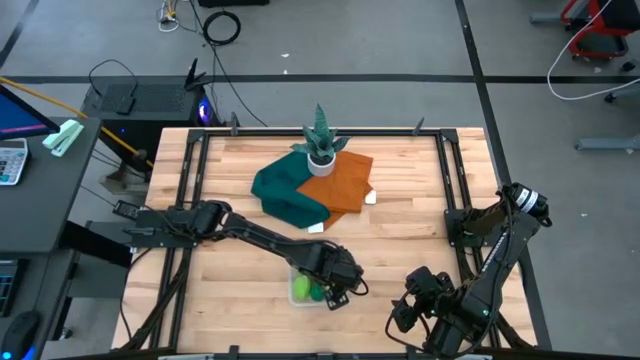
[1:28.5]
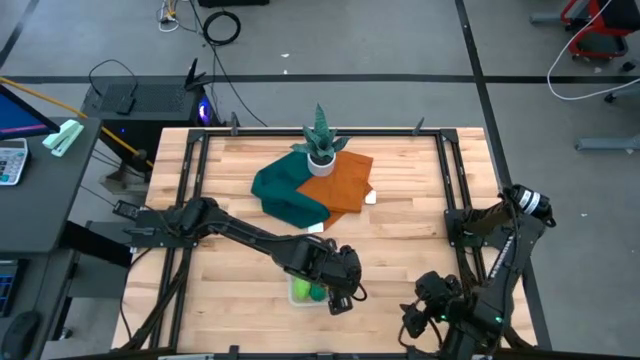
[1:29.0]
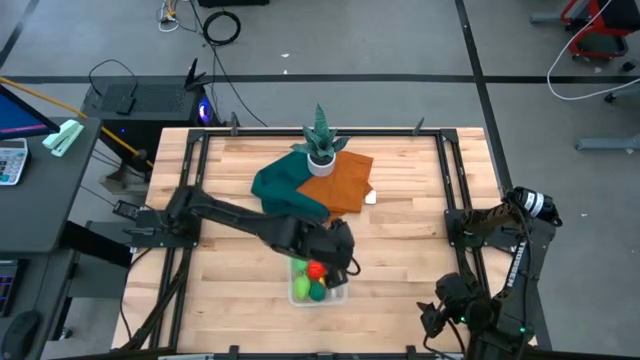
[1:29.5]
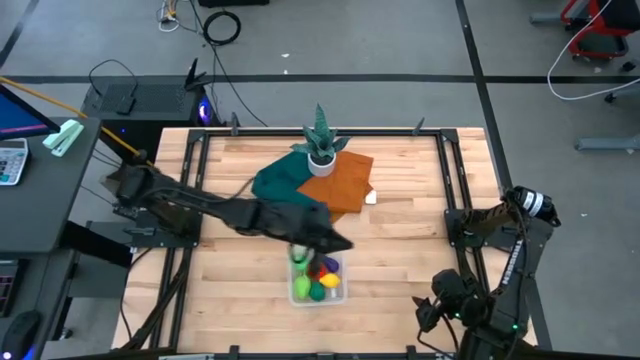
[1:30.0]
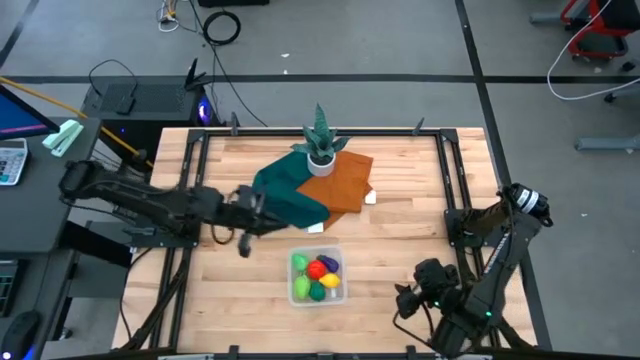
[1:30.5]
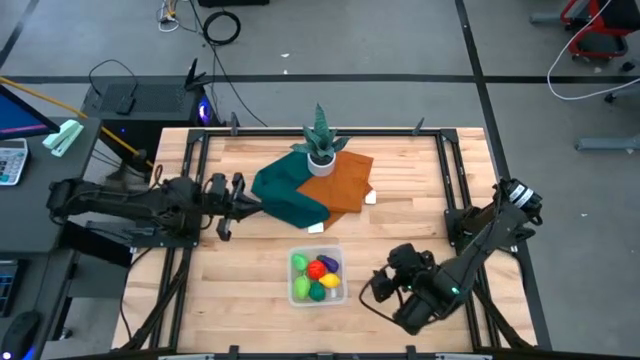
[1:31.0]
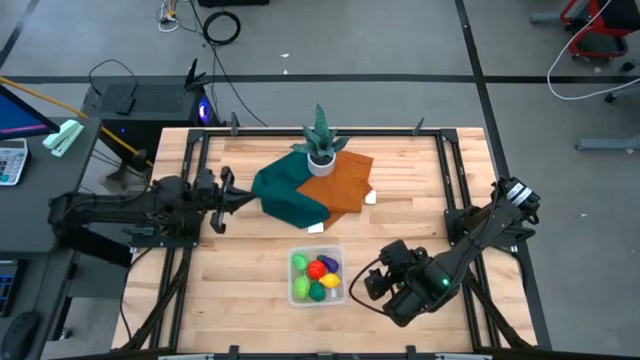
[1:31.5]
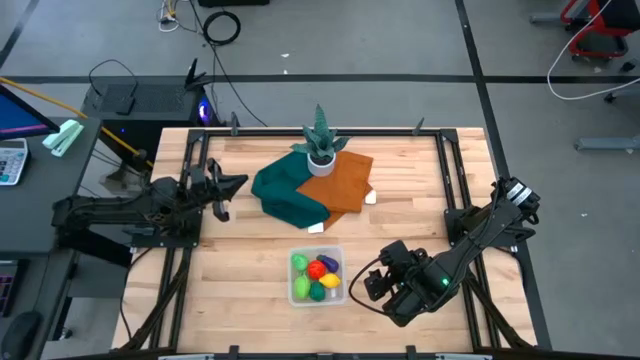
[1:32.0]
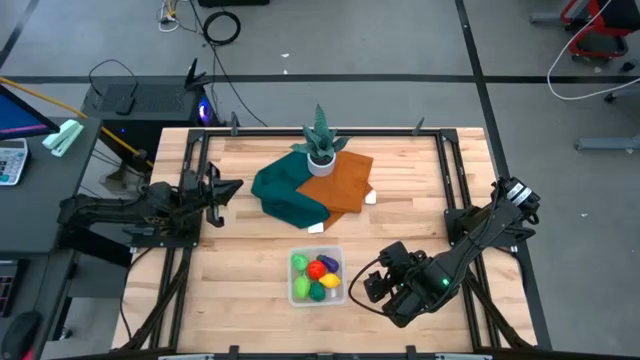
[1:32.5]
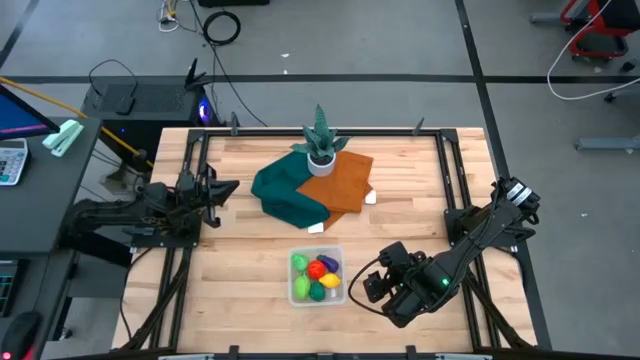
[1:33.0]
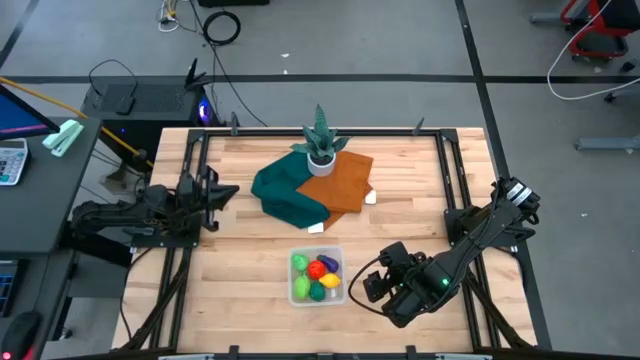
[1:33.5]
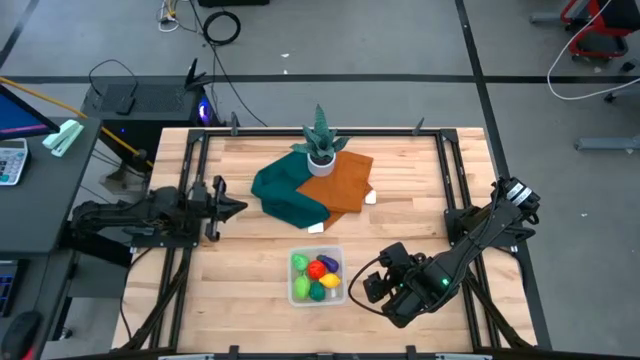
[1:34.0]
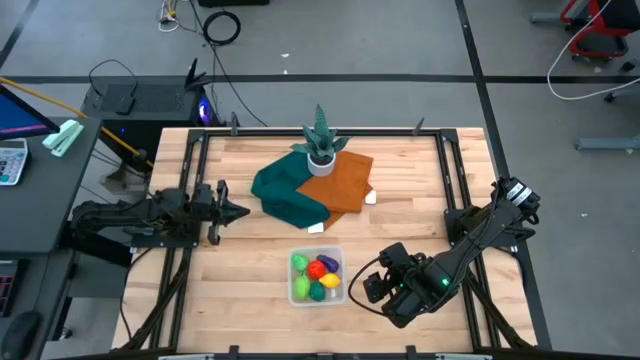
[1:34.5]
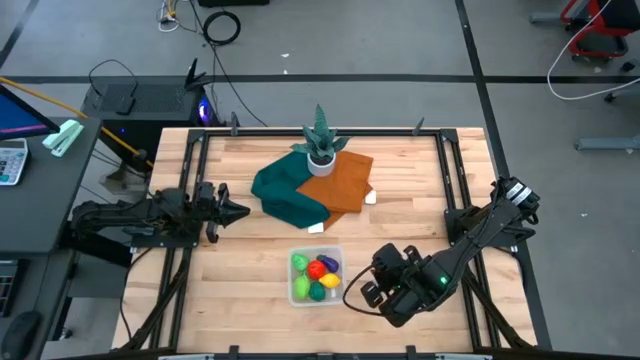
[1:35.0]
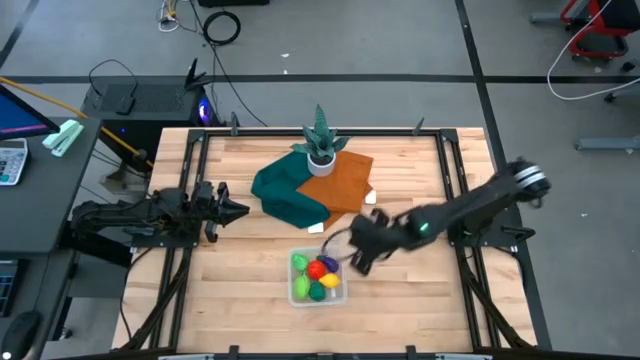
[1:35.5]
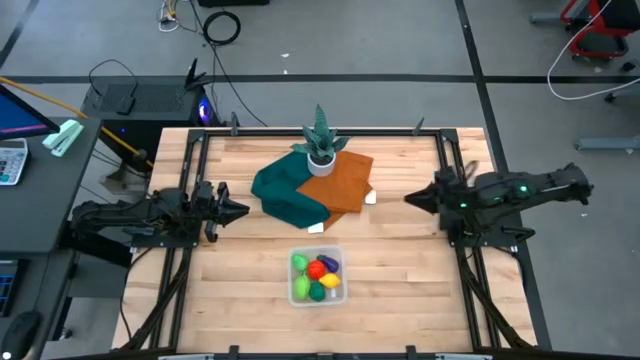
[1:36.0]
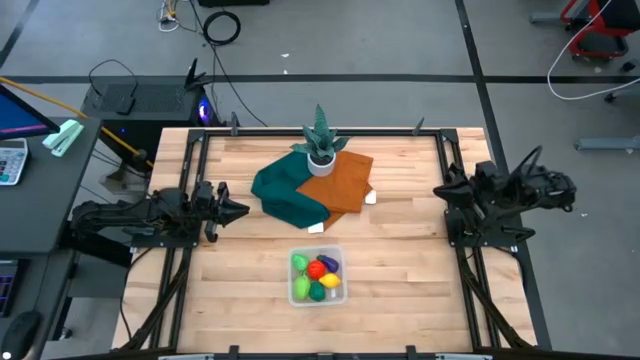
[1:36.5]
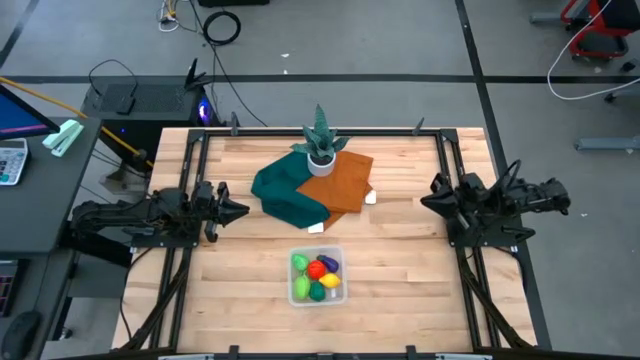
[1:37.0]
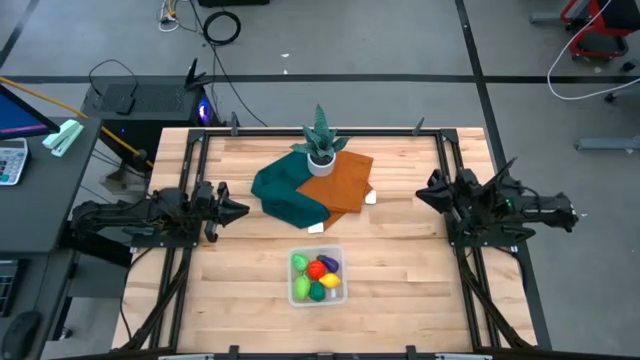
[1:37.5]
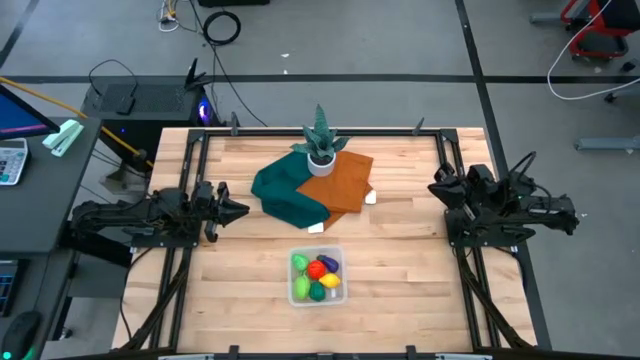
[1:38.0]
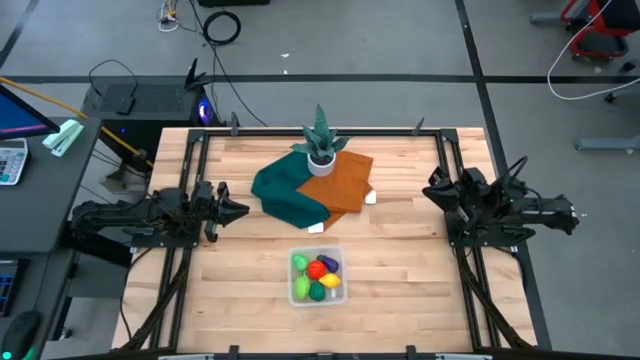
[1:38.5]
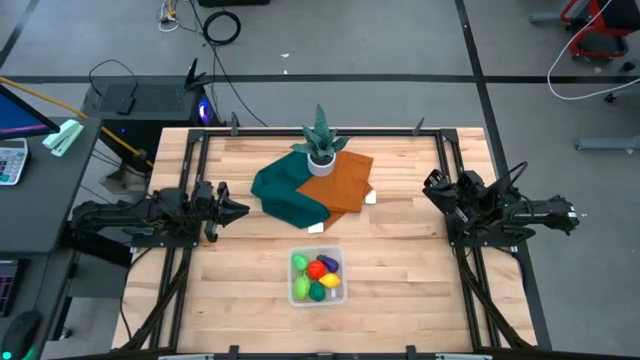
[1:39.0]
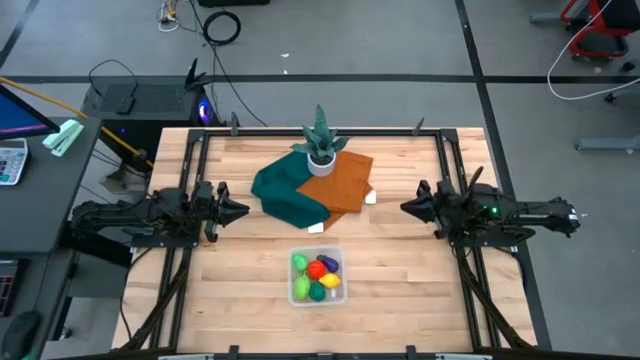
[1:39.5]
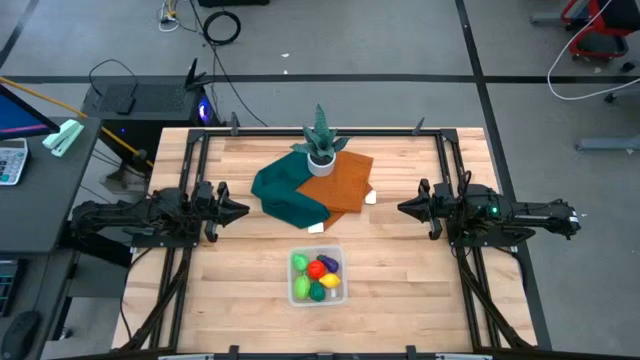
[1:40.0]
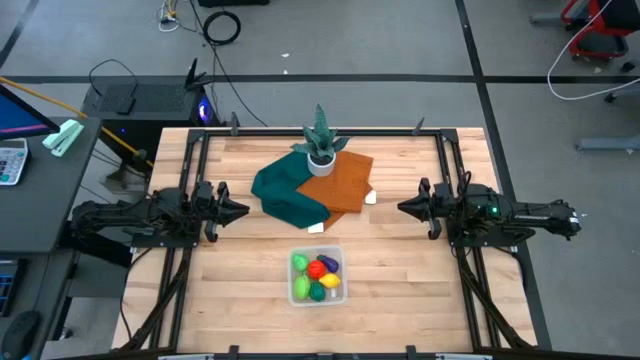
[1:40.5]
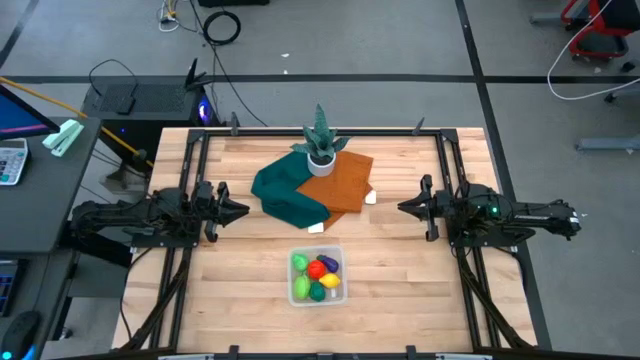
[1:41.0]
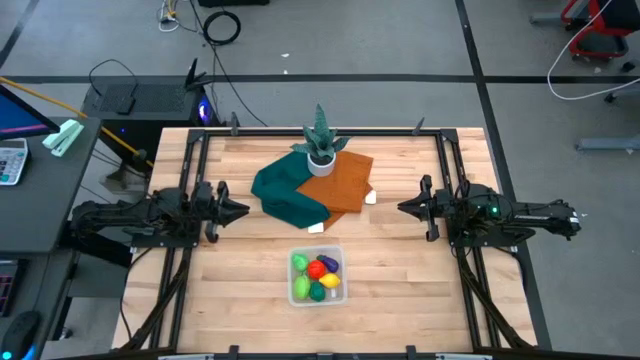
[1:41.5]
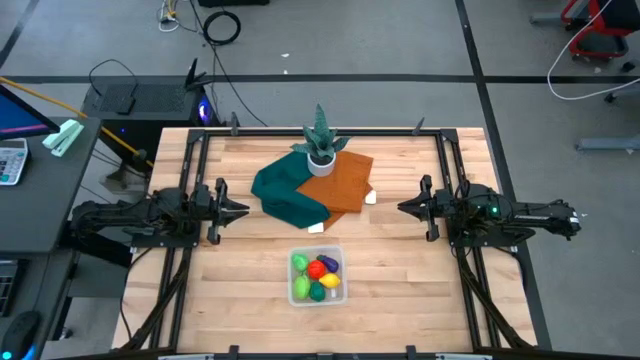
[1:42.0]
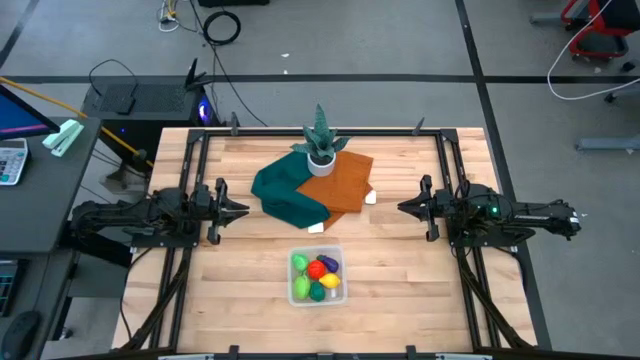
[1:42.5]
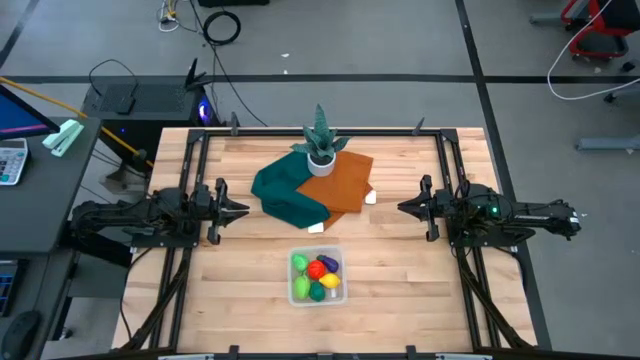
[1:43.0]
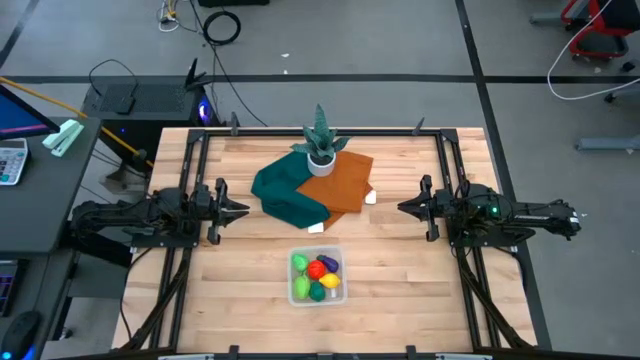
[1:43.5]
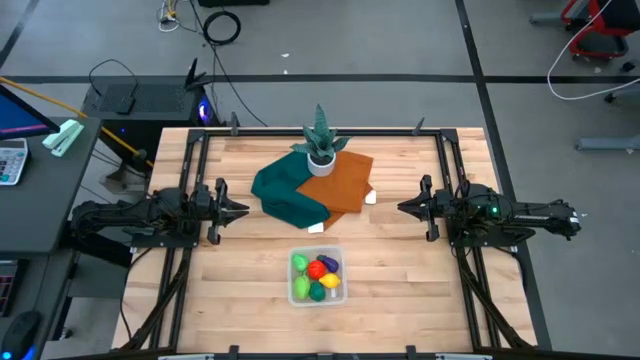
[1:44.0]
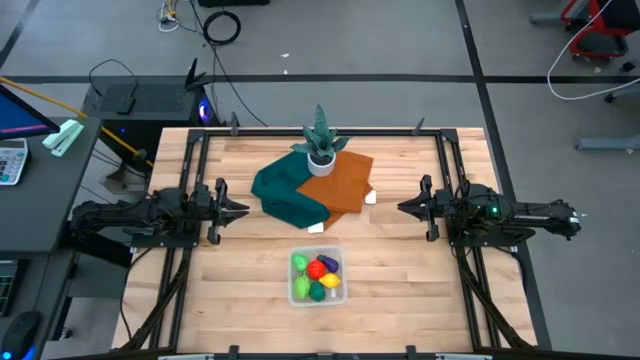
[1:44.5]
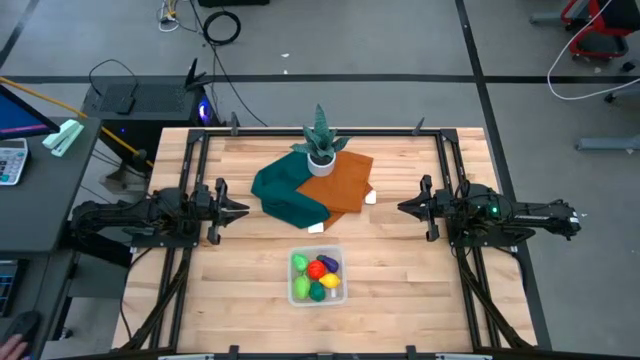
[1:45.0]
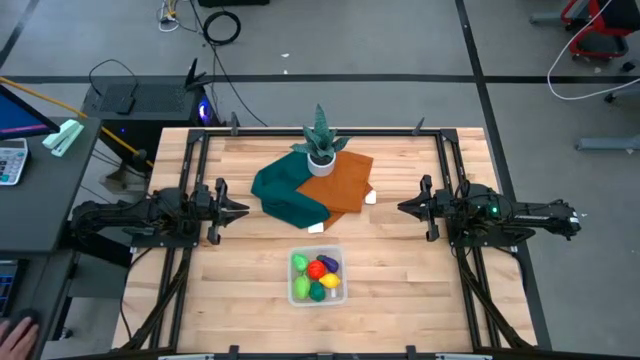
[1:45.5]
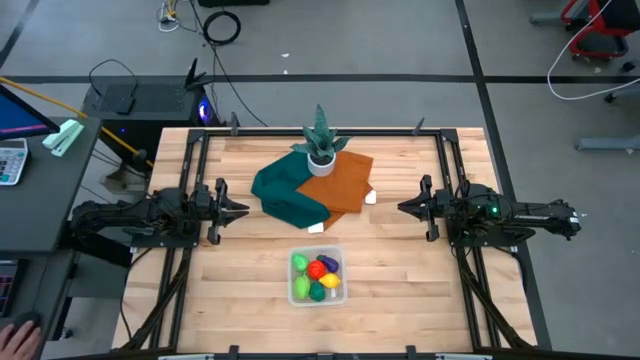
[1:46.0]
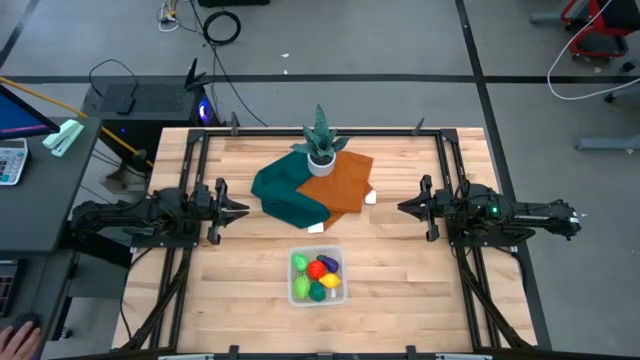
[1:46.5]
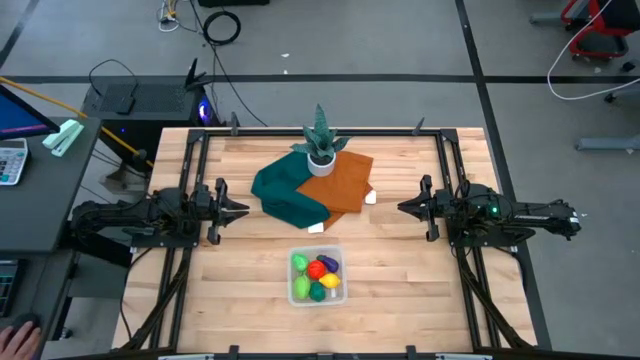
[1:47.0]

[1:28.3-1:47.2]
Task: Pick and placing Produce into tupperware
Return to Home Position

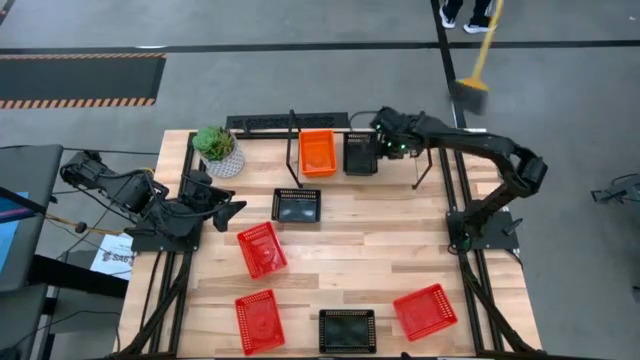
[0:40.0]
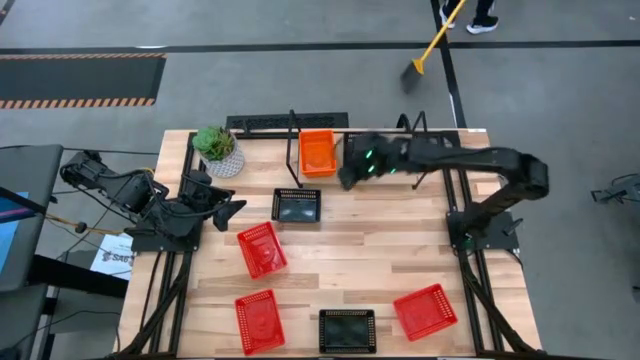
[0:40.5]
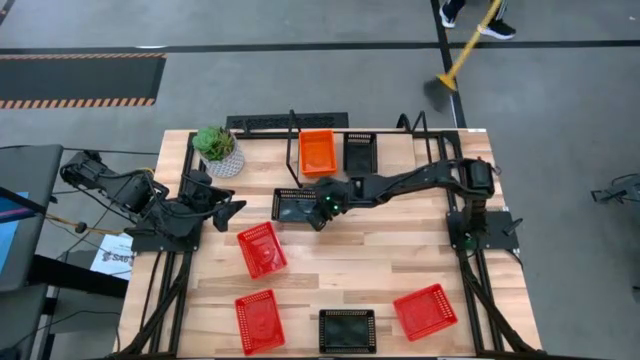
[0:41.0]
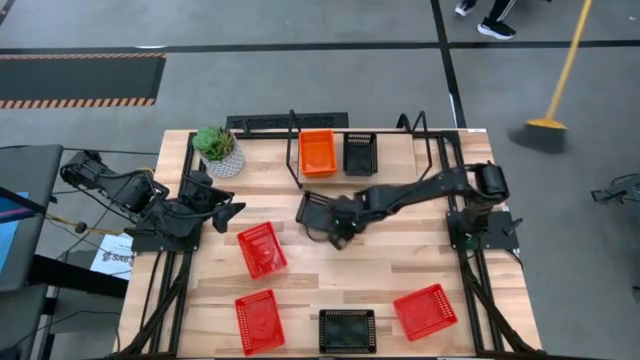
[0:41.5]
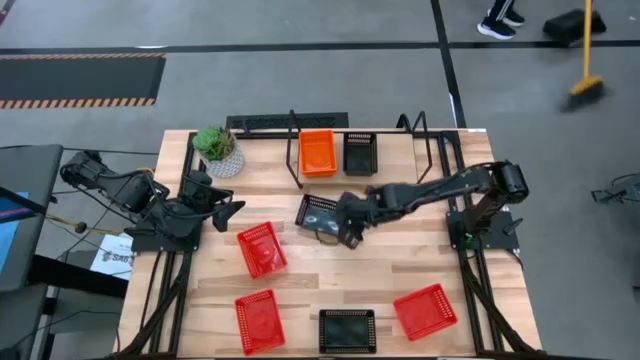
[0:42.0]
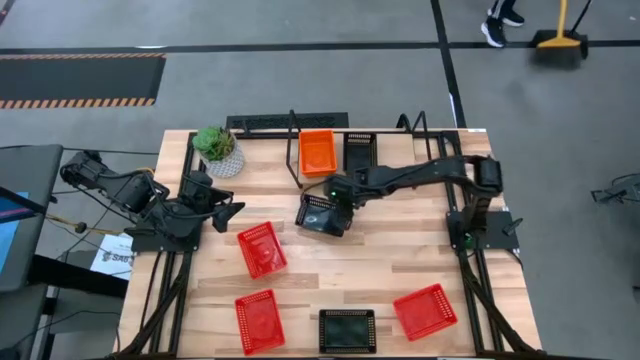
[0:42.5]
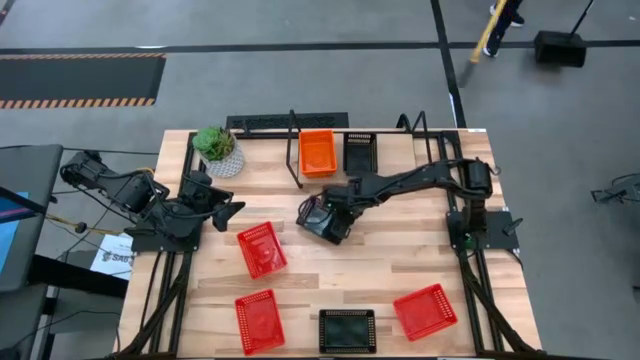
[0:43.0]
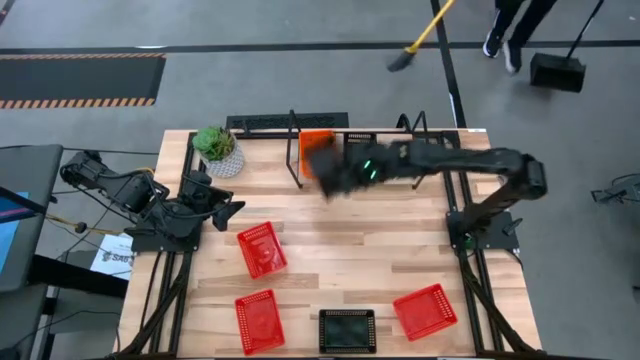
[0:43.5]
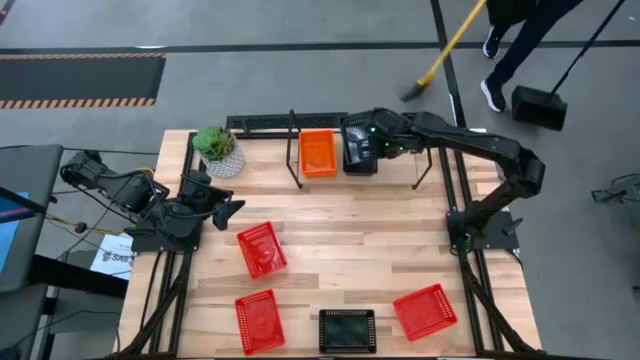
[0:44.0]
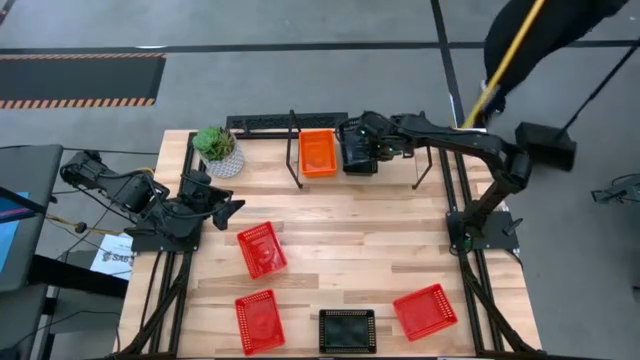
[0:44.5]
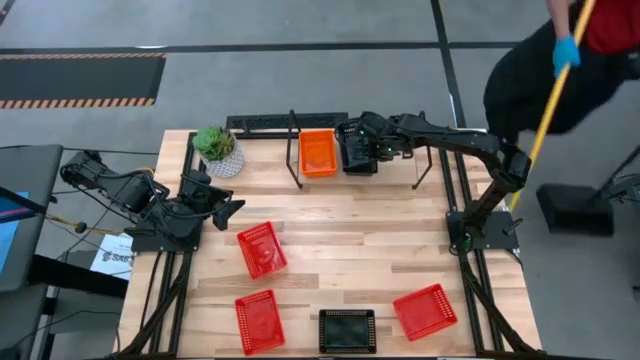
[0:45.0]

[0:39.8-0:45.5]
Task: Stack baskets on shelf by color
Stack the top black bin on top of the black stacked bins on the shelf
